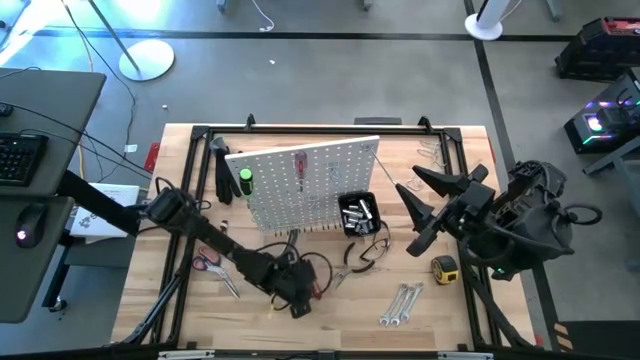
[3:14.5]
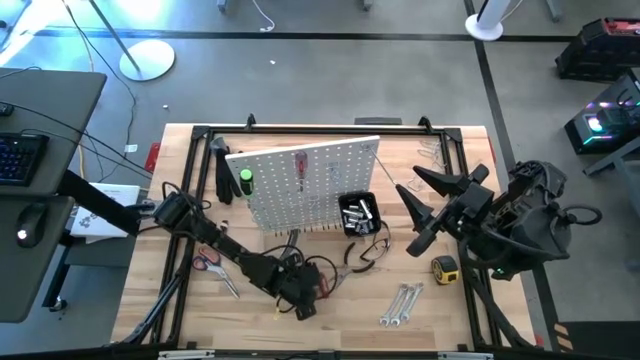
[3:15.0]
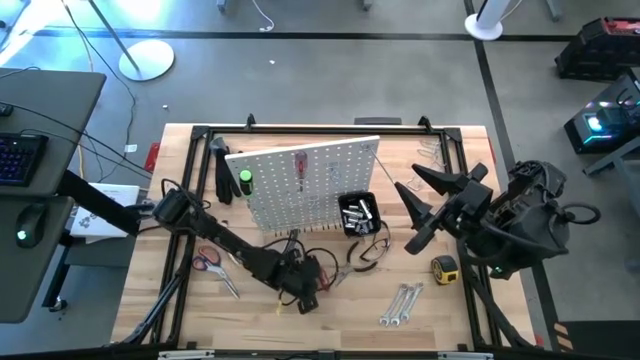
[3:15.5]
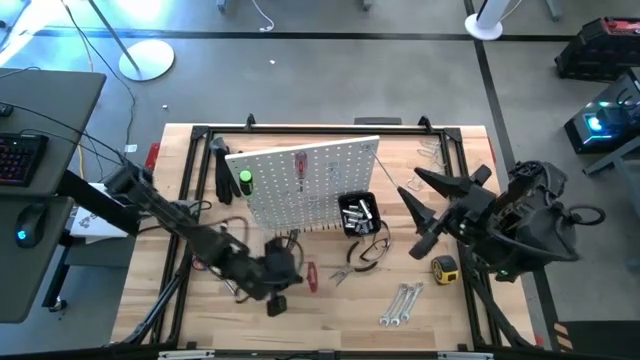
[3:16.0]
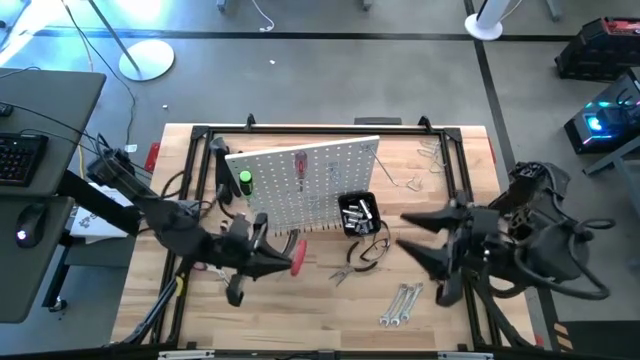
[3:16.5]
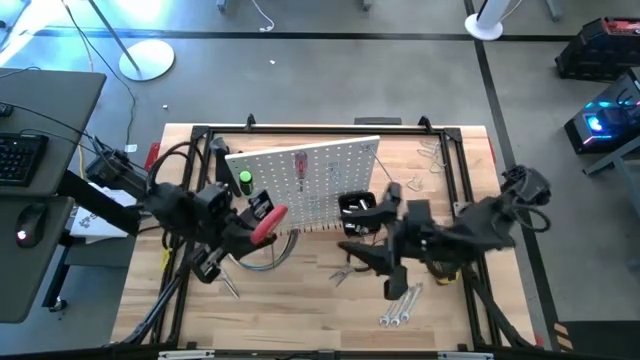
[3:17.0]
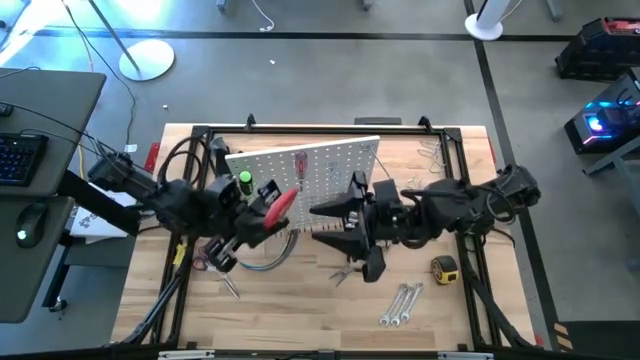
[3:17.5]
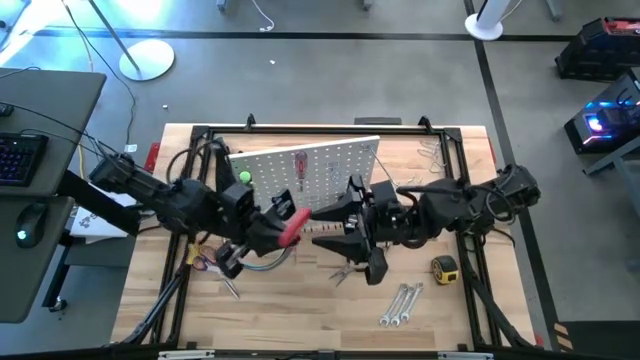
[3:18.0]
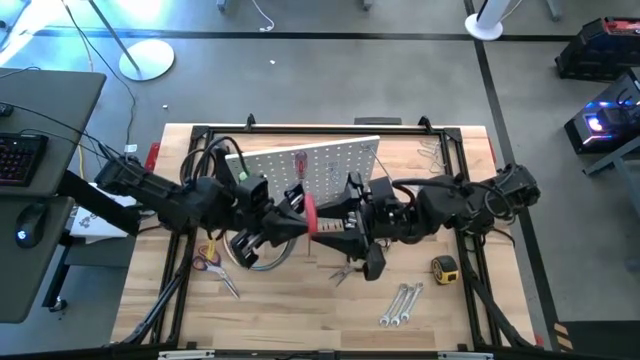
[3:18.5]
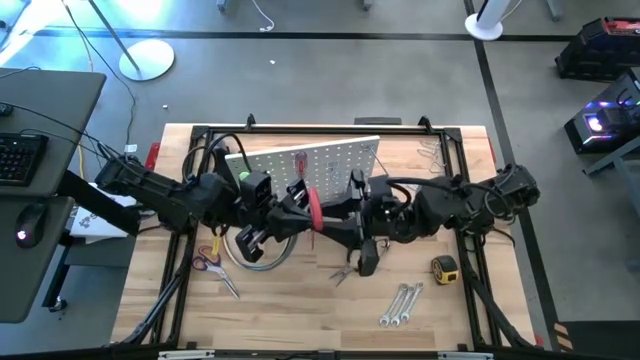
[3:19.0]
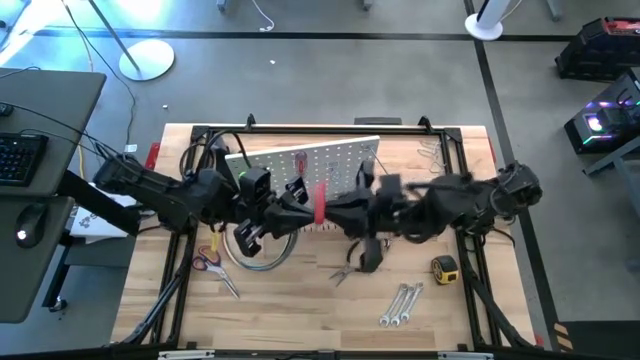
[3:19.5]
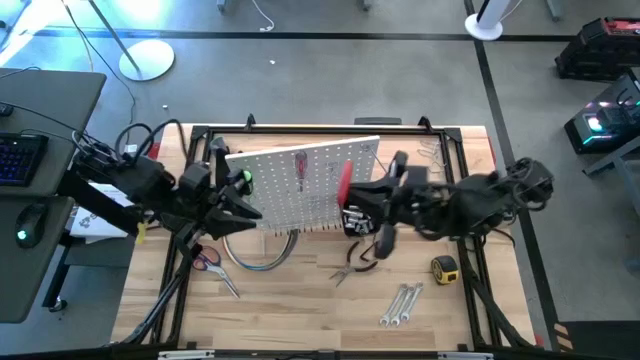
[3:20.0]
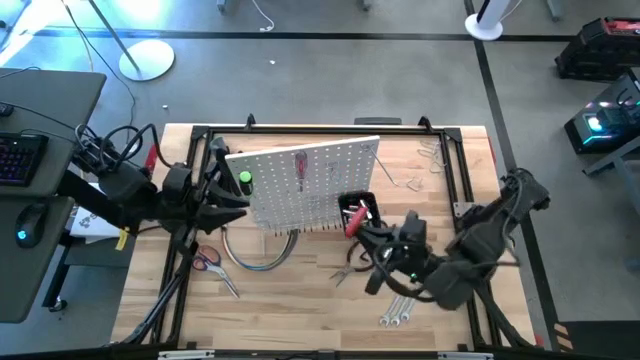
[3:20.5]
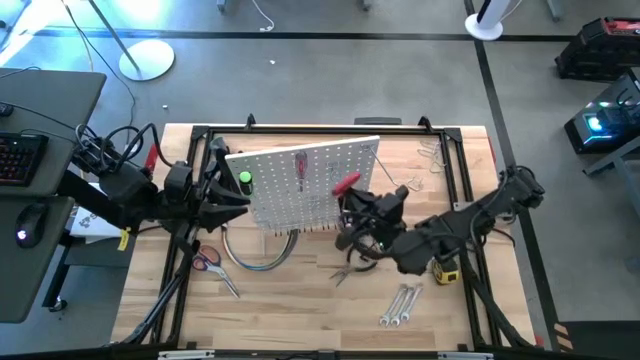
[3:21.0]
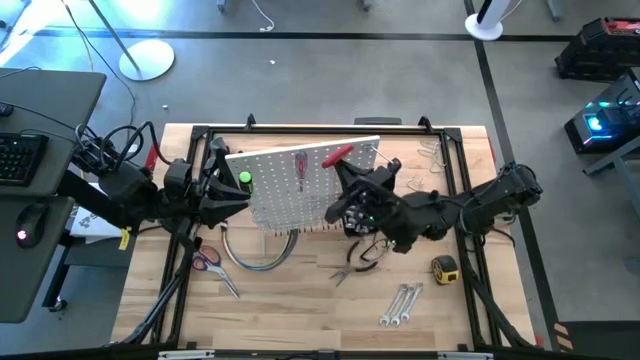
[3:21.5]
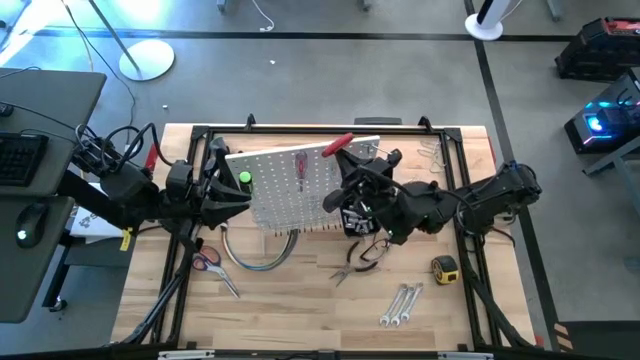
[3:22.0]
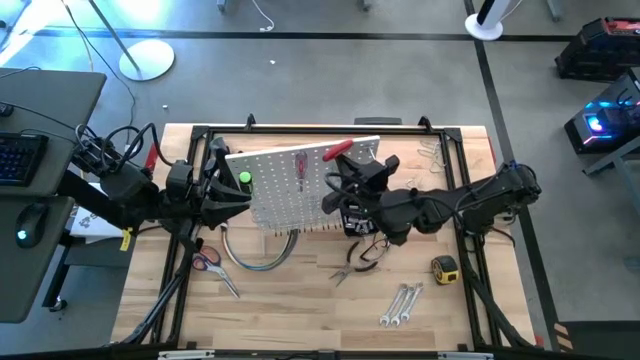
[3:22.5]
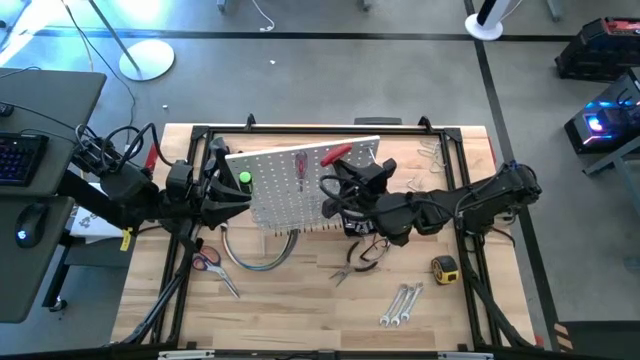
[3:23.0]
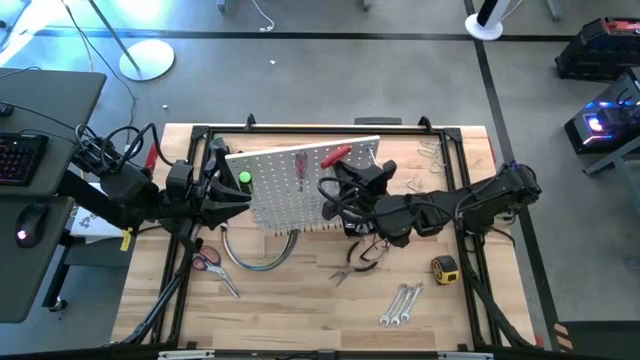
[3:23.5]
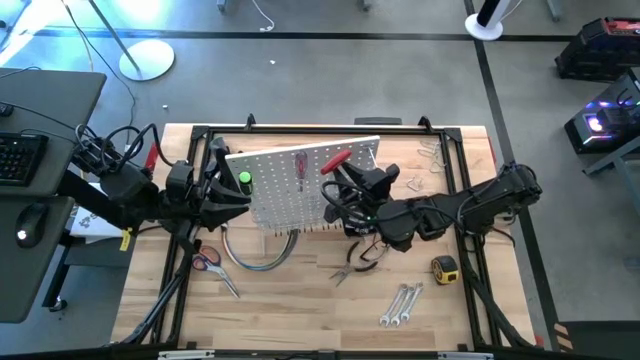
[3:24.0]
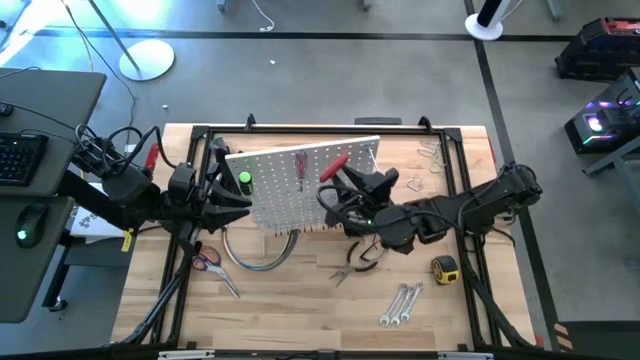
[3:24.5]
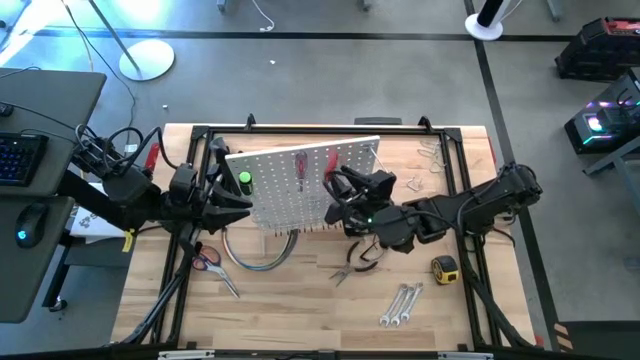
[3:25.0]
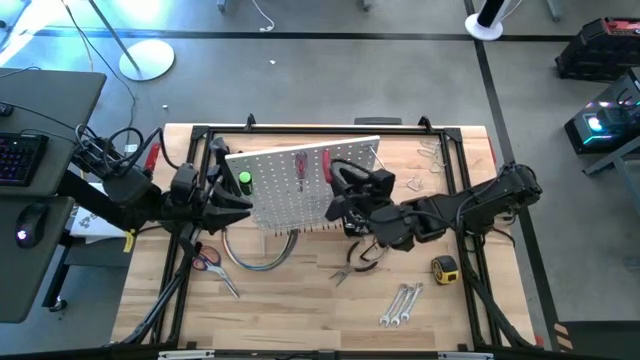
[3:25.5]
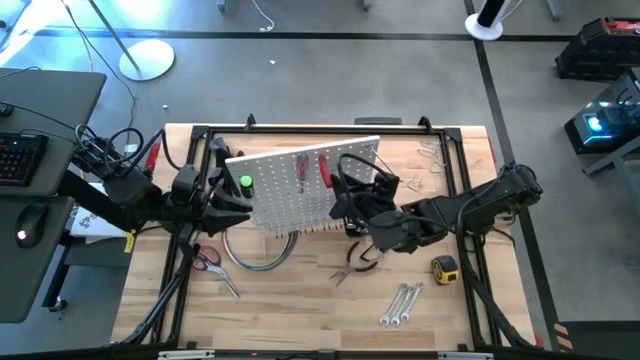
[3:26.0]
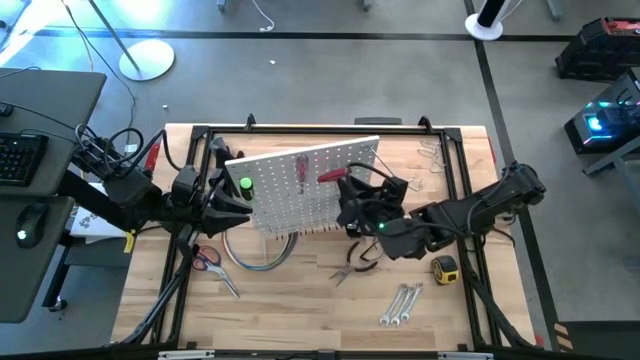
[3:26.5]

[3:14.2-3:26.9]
Task: Hang tools onto peg board
Hang the red allen wrench on the peg board

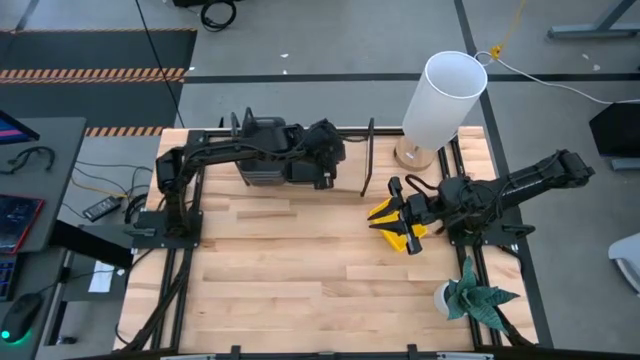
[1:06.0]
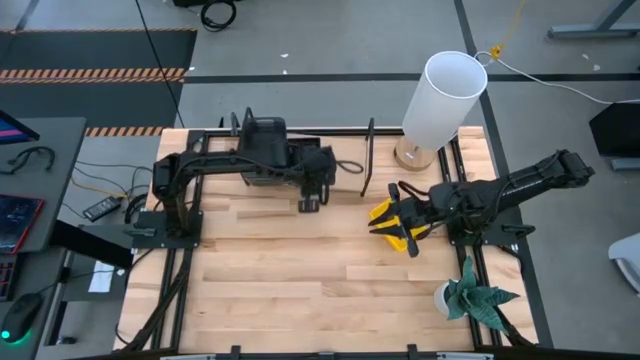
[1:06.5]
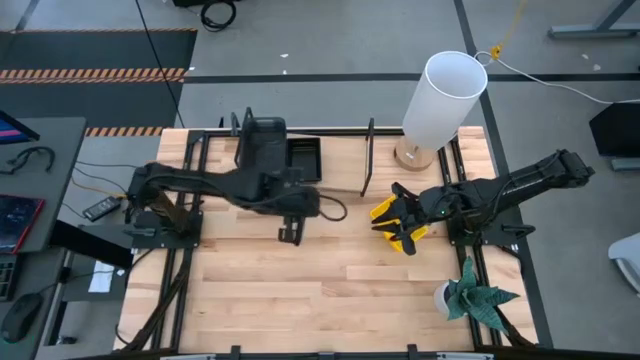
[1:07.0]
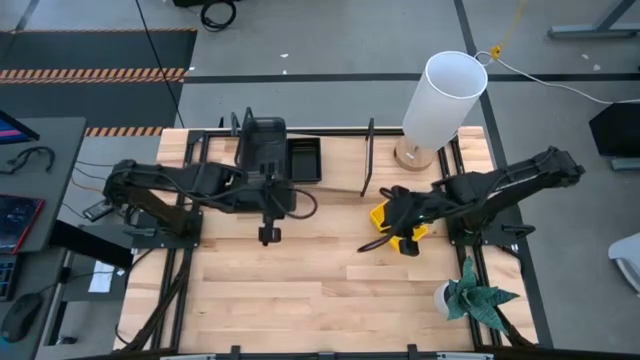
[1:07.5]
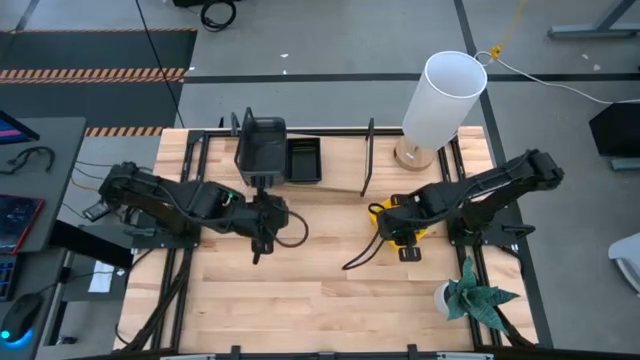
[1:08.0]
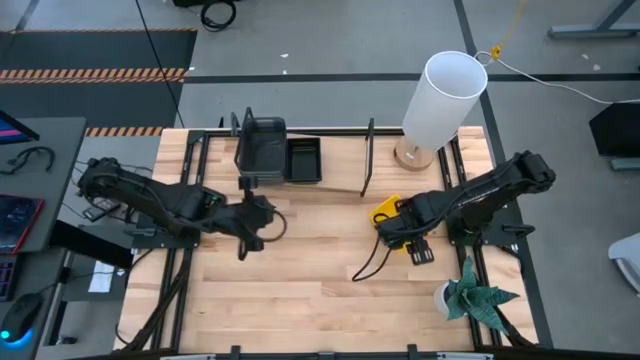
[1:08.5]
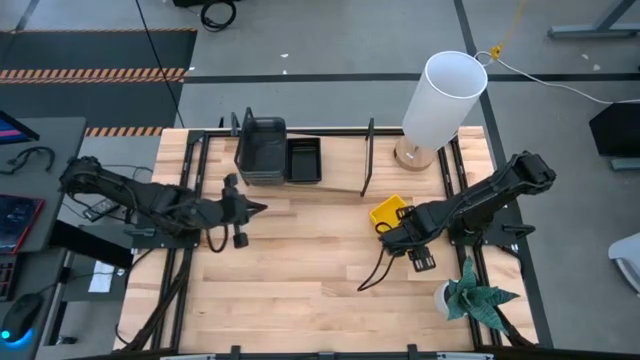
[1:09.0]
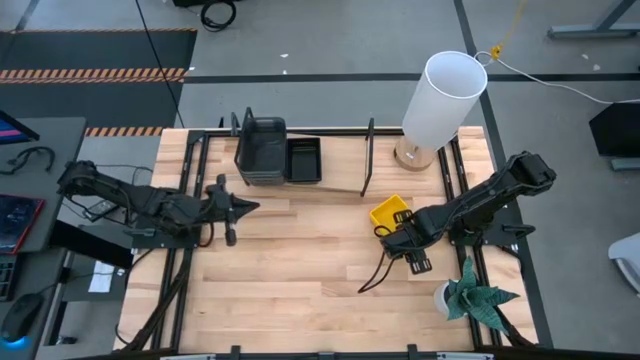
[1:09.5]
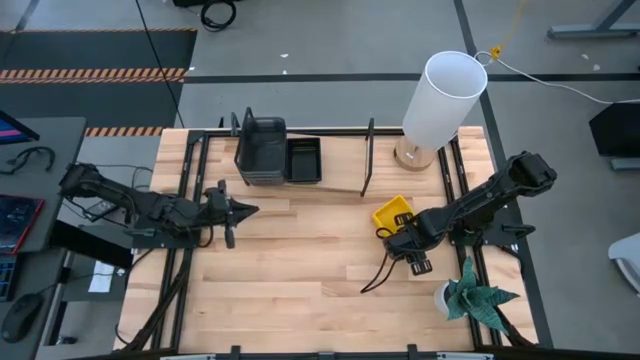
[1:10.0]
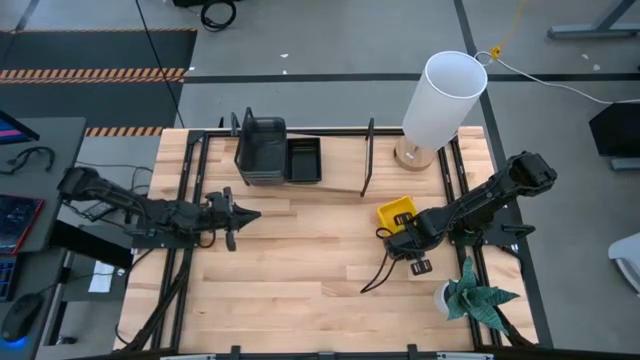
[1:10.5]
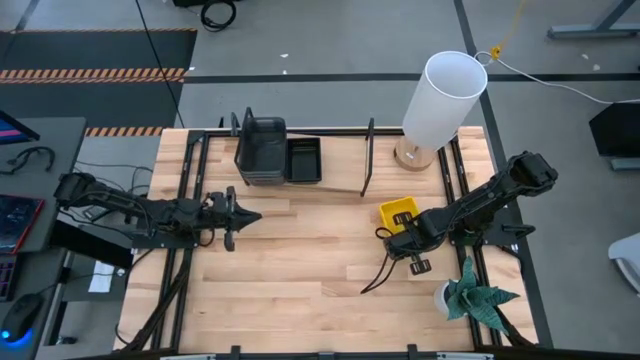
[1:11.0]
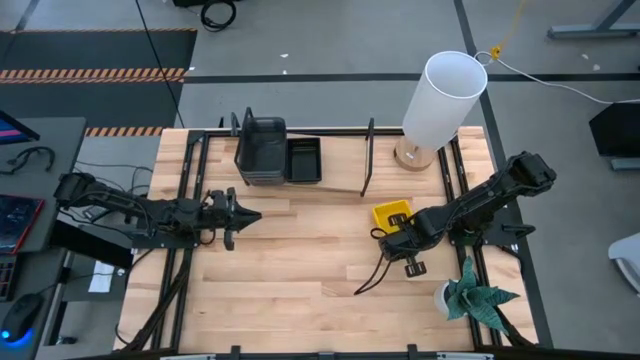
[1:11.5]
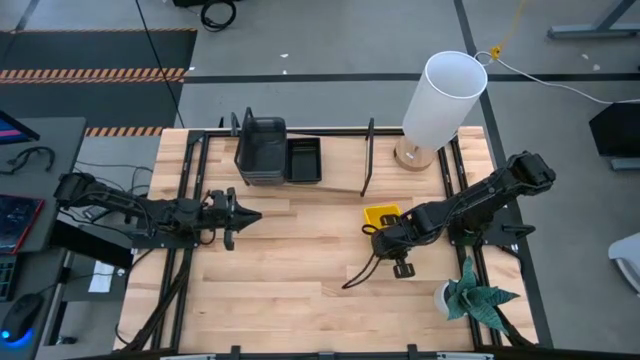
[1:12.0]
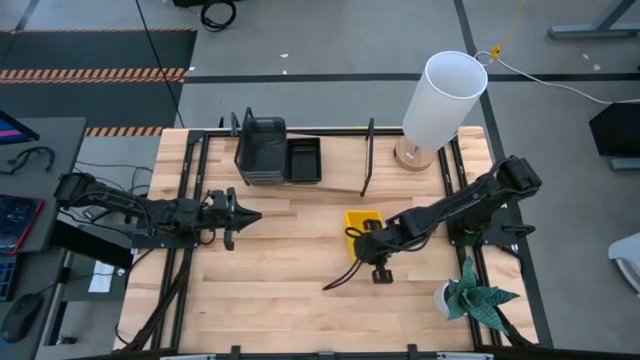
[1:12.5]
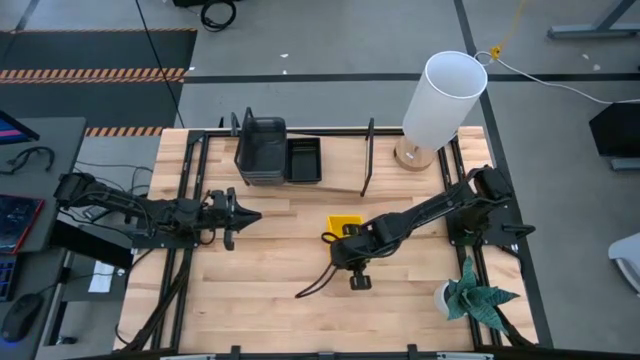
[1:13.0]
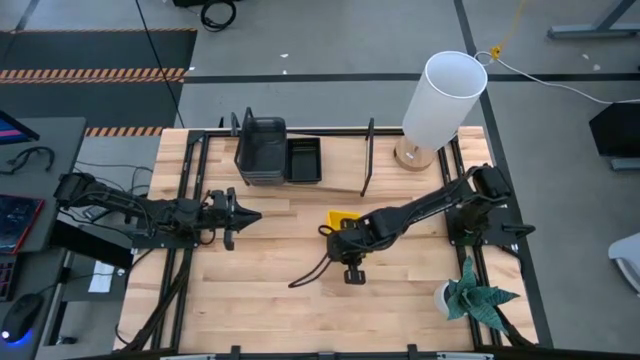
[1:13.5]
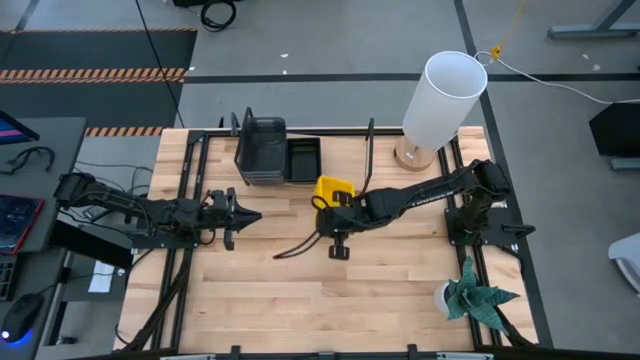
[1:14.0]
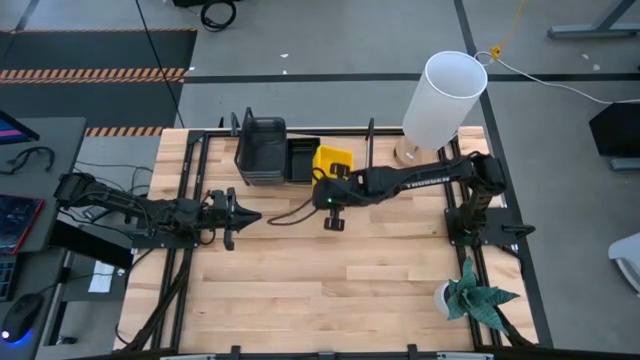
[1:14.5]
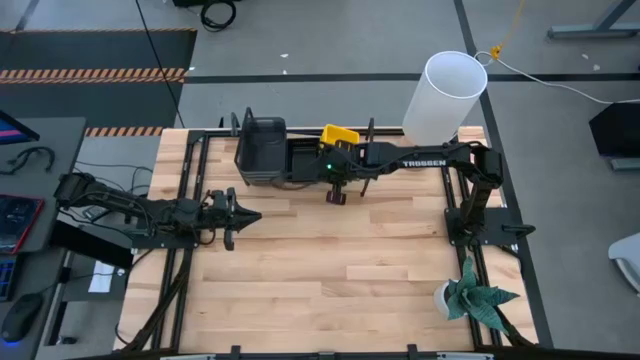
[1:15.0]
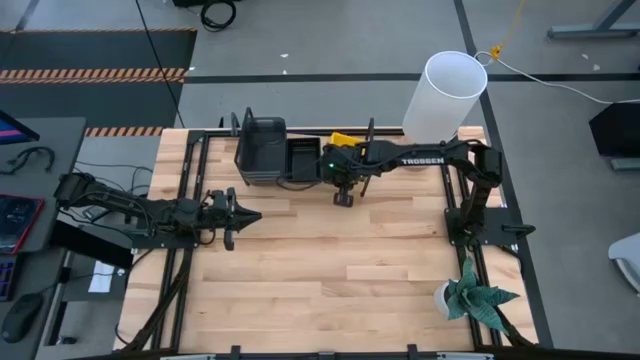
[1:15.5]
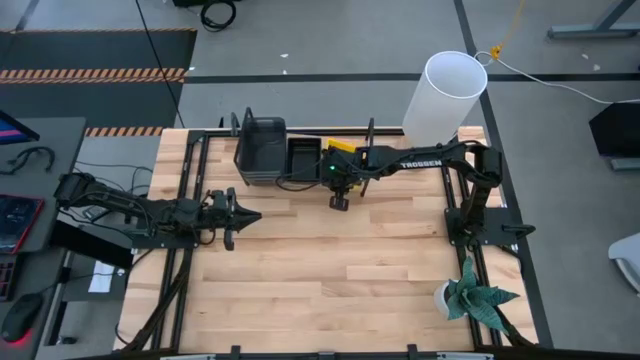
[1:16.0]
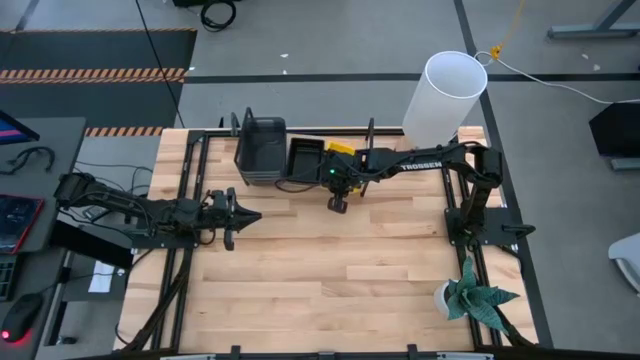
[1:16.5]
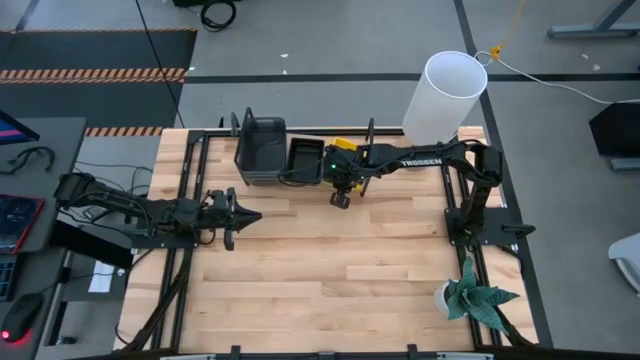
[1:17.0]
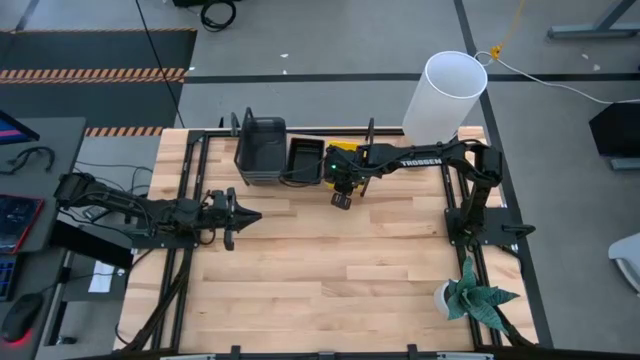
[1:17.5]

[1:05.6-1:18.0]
Task: Stack baskets on shelf by color
Put the stacked yellow baskets on the shelf
